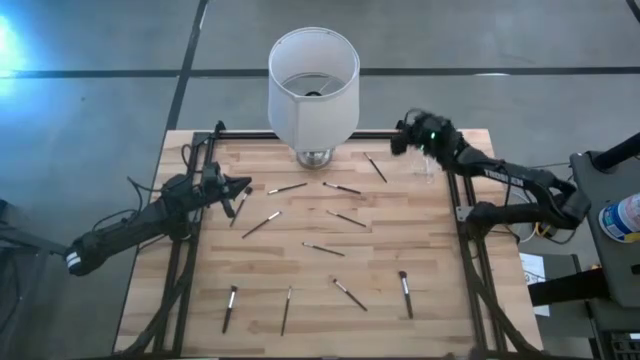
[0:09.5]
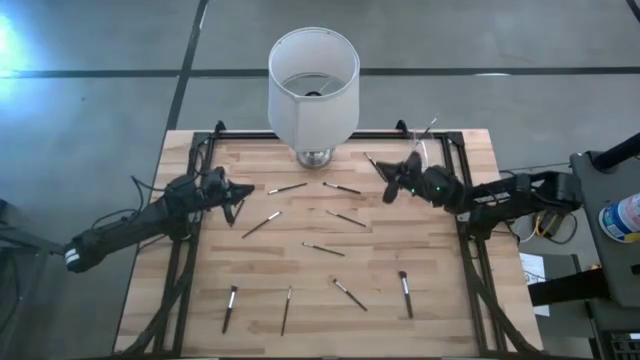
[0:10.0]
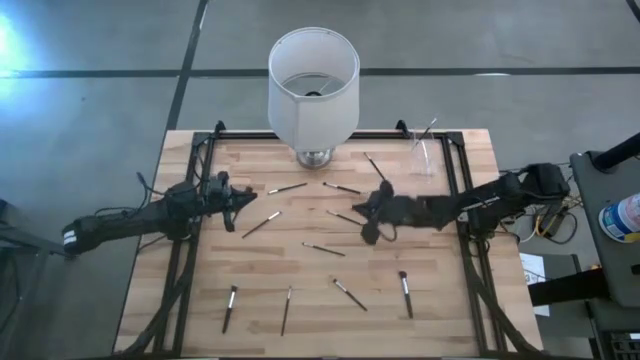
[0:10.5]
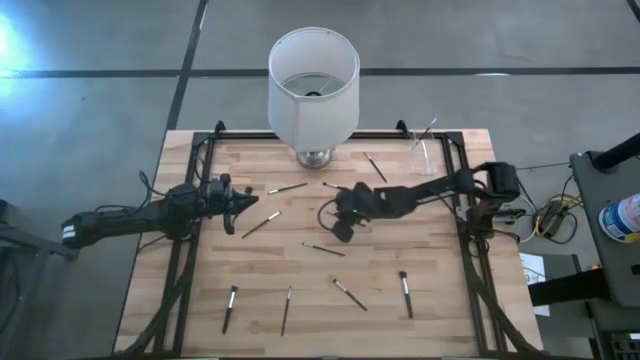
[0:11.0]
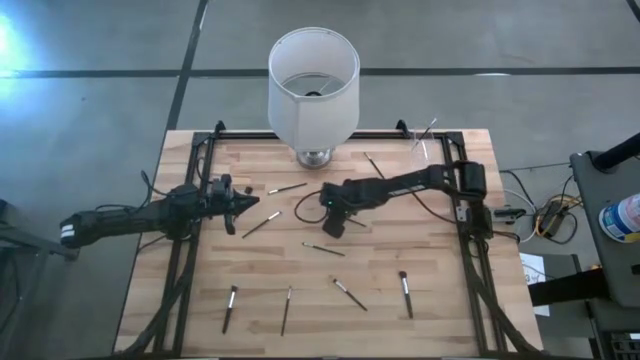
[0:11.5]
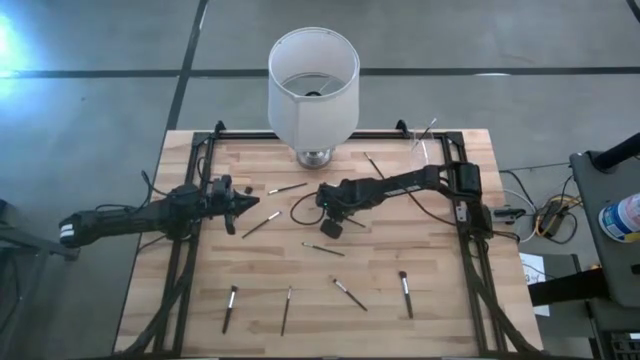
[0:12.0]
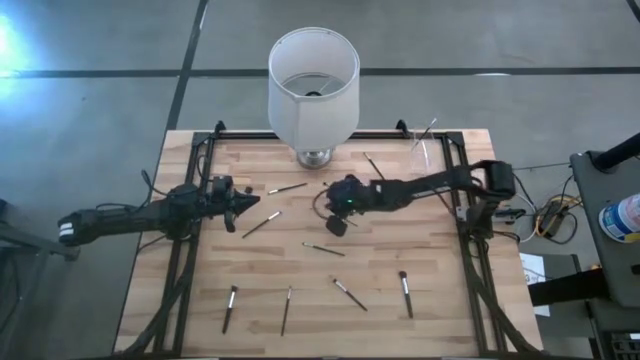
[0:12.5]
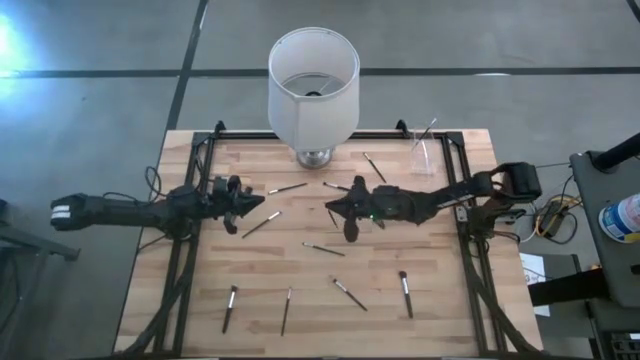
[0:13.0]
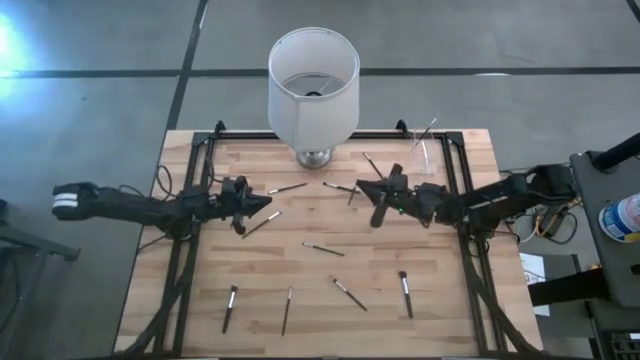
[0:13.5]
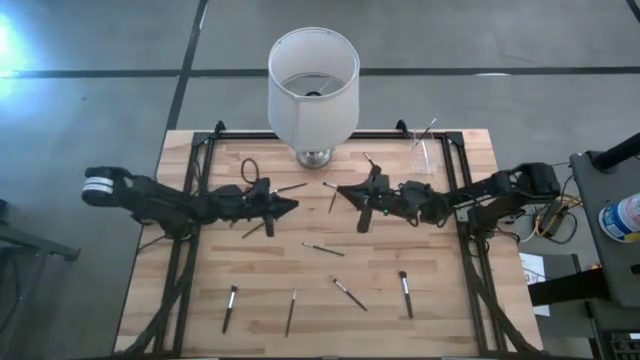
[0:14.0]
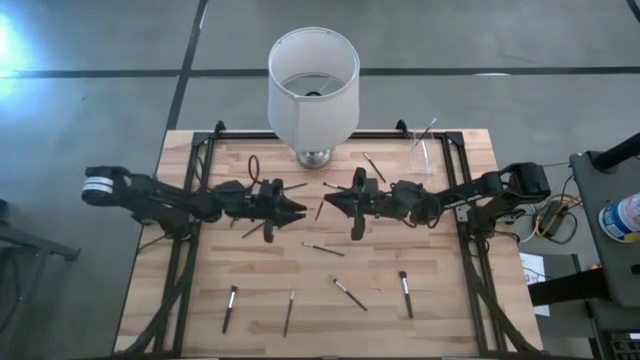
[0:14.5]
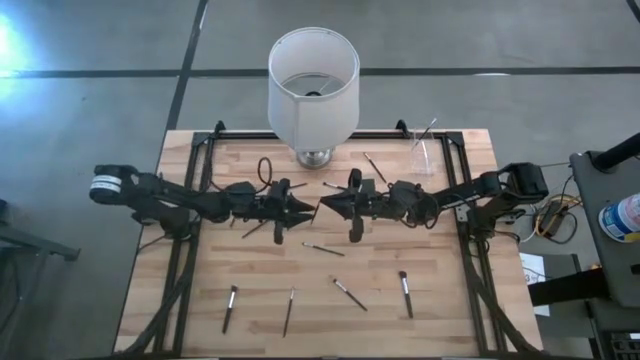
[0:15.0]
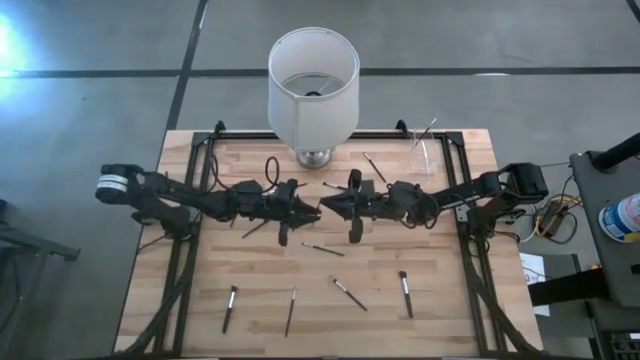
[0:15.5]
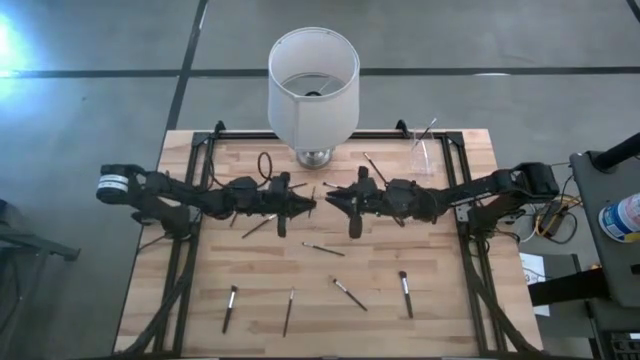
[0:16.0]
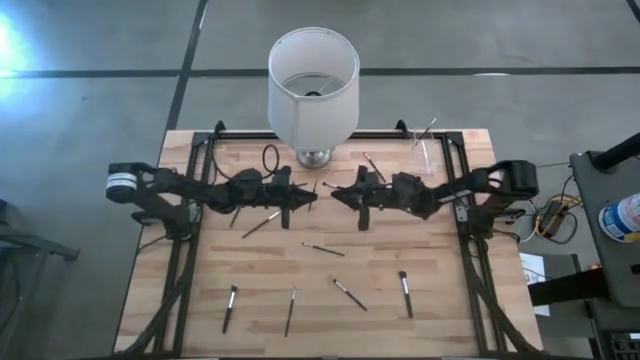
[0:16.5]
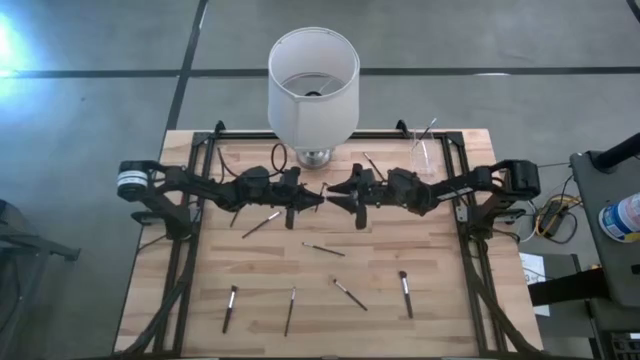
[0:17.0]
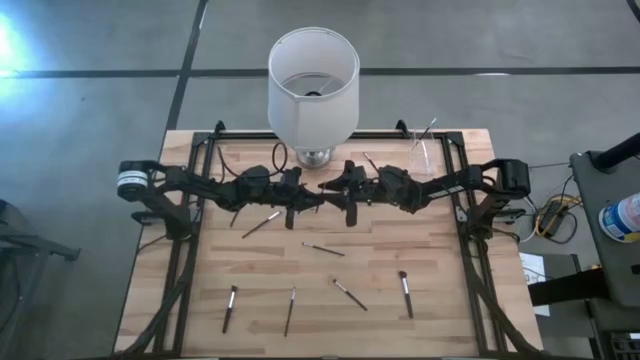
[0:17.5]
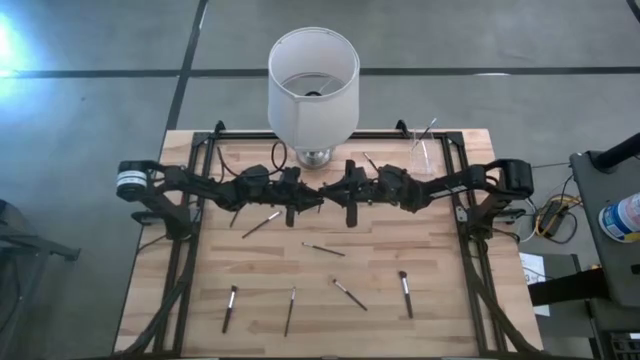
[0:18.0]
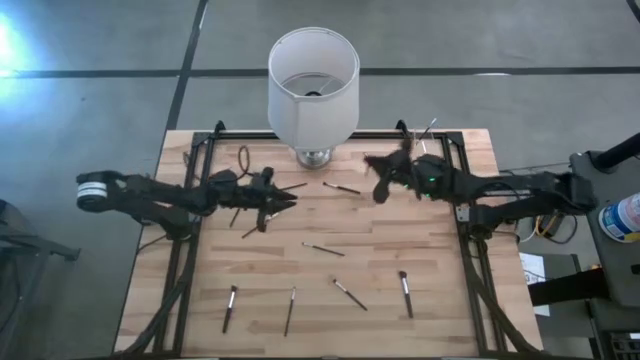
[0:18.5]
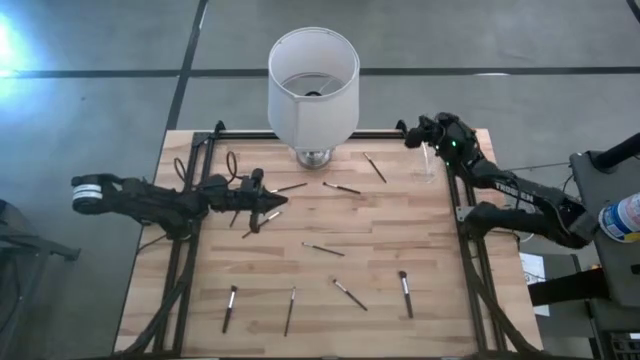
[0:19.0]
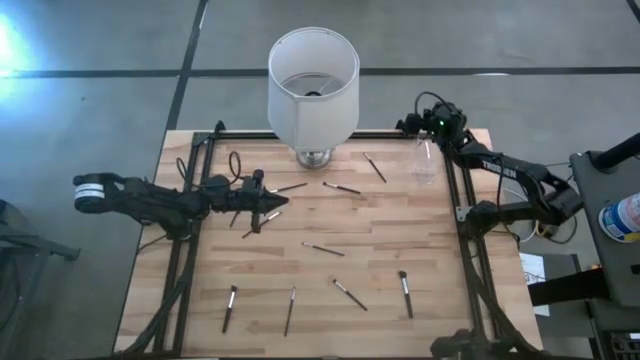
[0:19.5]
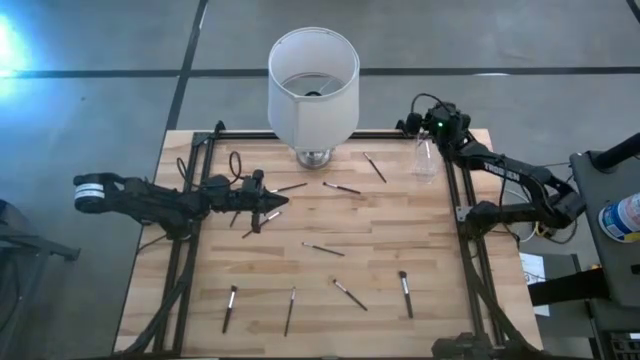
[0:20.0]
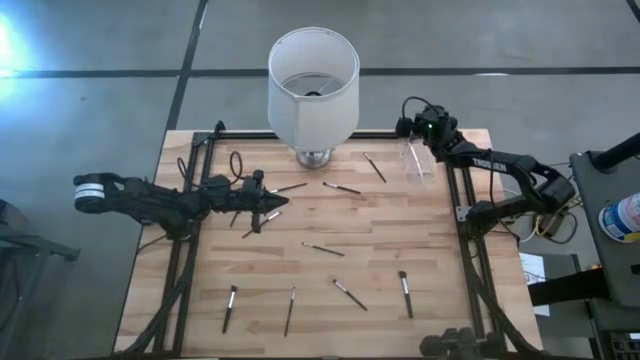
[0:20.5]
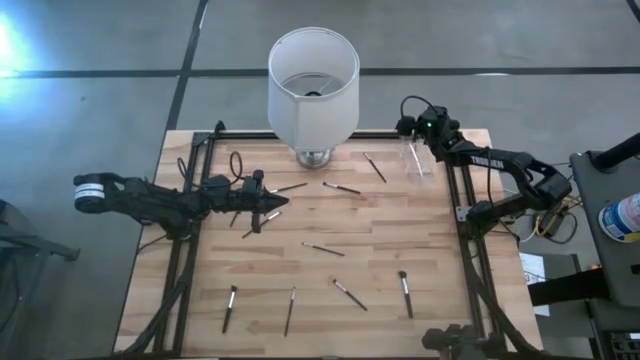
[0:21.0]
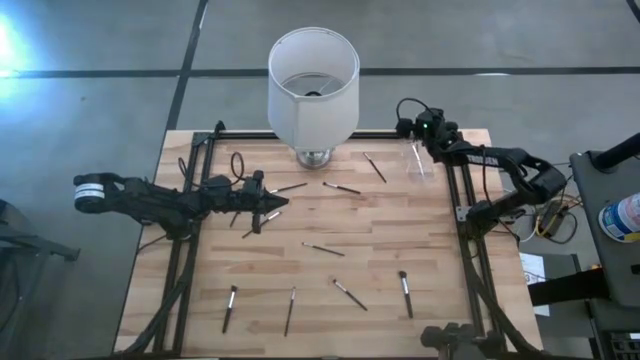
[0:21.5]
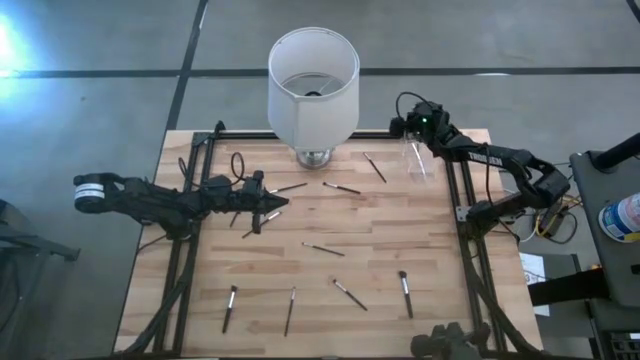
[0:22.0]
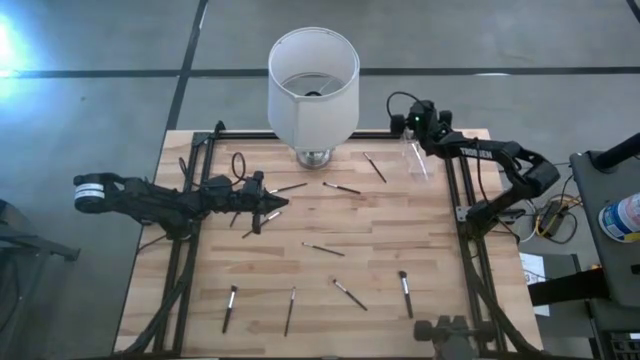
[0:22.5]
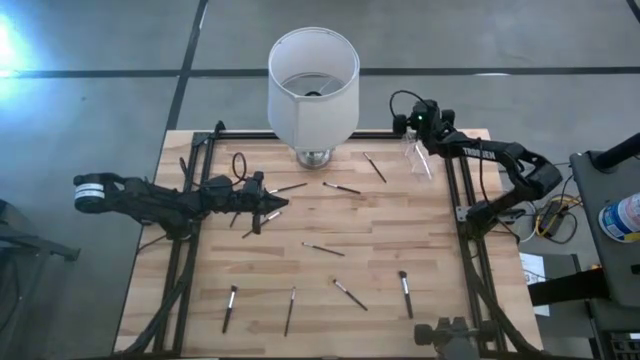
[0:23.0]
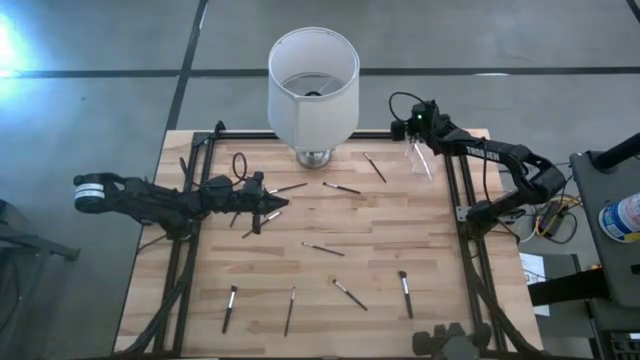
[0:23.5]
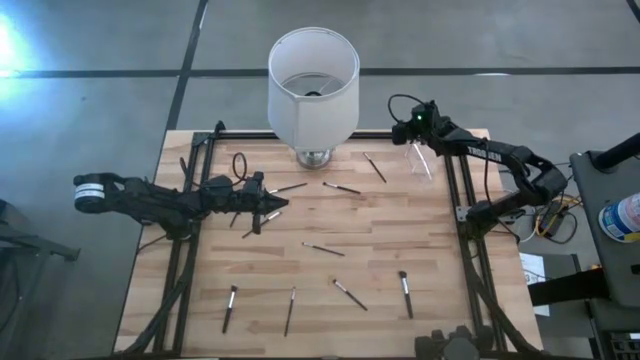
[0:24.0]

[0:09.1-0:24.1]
Task: Put items in baskets/containers
Put the eyeshadow brush into the transparent organizer

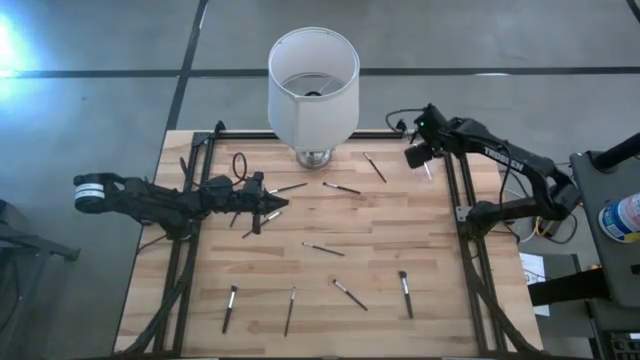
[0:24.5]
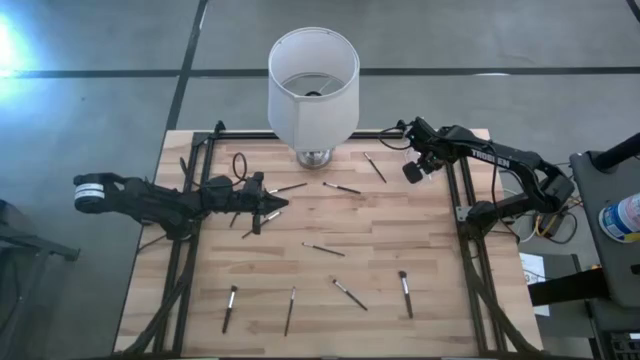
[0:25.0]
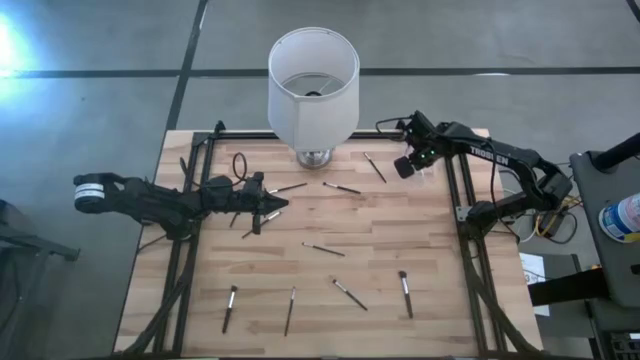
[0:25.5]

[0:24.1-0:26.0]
Adjust the transparent organizer

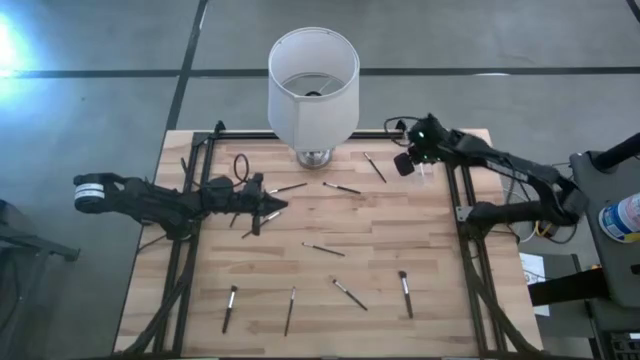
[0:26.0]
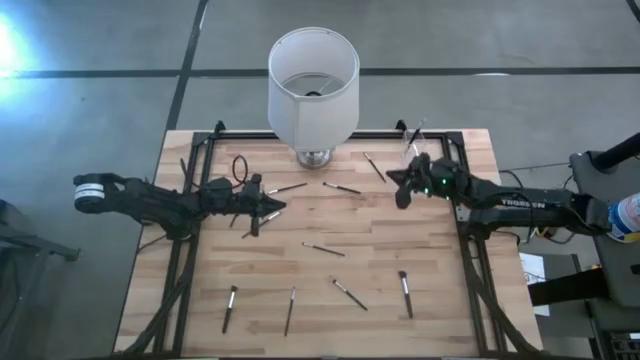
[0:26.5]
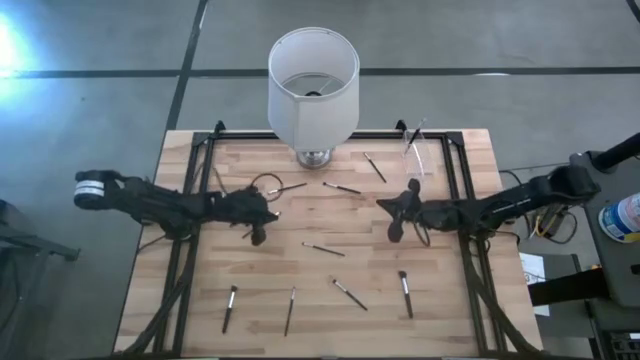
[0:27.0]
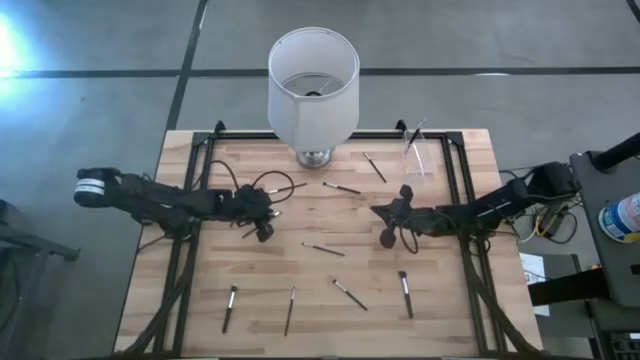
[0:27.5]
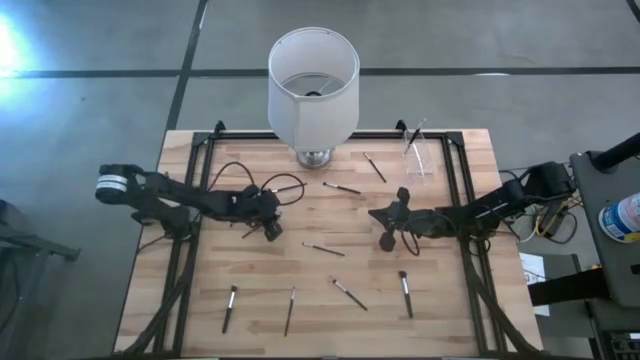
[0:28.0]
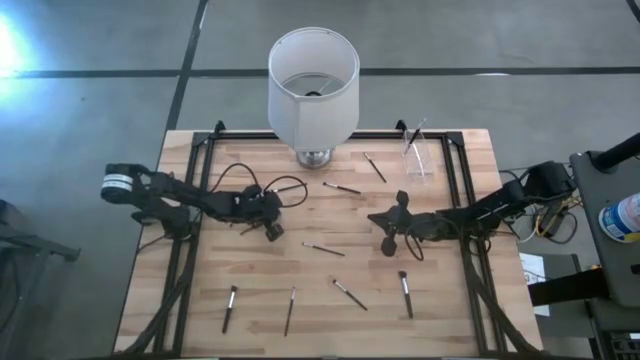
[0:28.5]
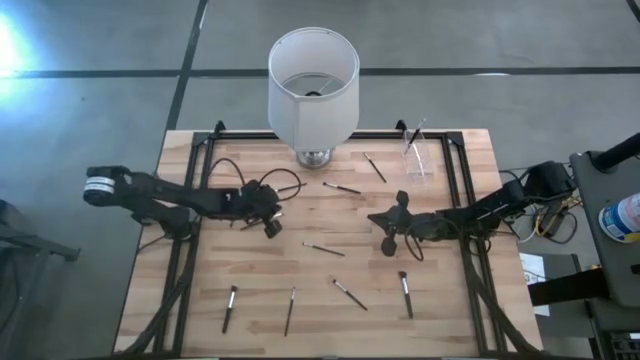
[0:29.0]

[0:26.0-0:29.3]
Put the eyeshadow brush into the transparent organizer
